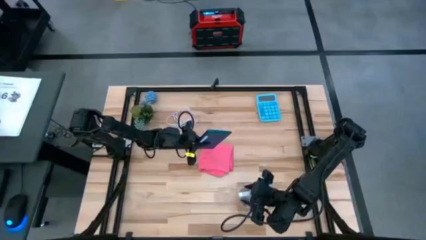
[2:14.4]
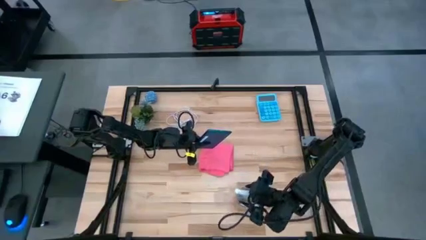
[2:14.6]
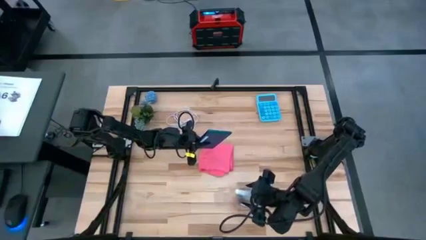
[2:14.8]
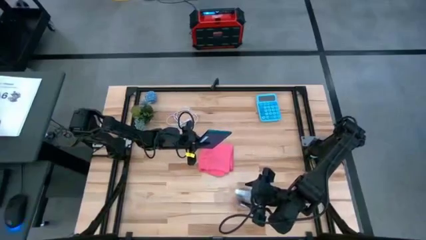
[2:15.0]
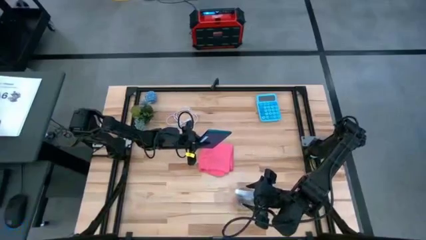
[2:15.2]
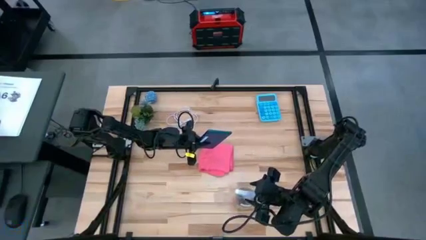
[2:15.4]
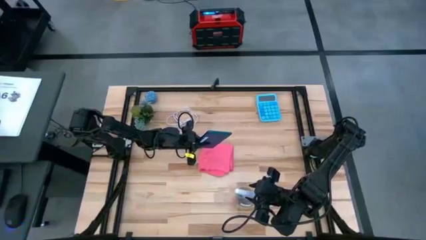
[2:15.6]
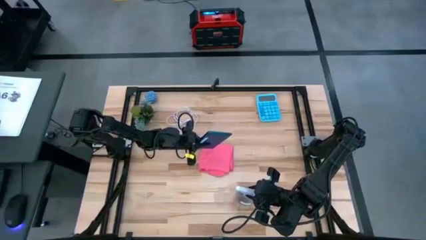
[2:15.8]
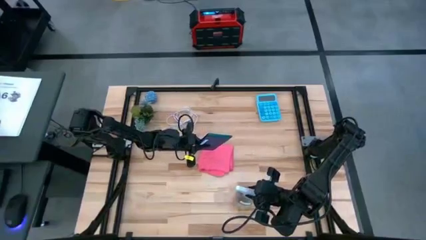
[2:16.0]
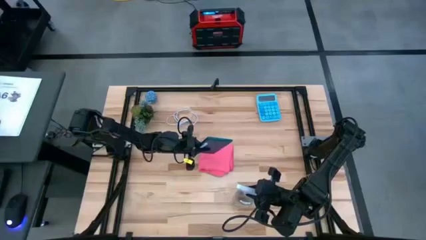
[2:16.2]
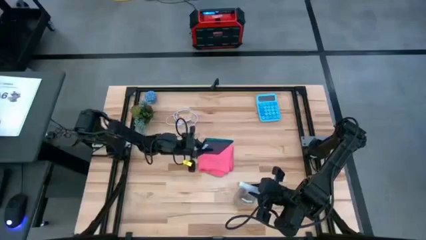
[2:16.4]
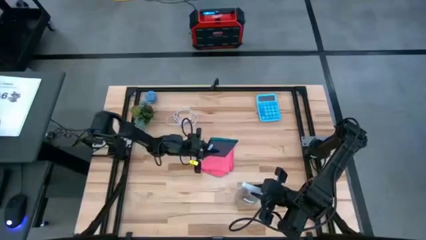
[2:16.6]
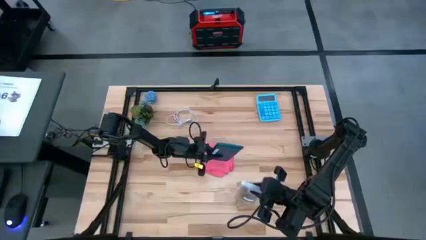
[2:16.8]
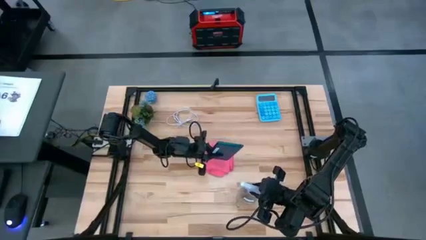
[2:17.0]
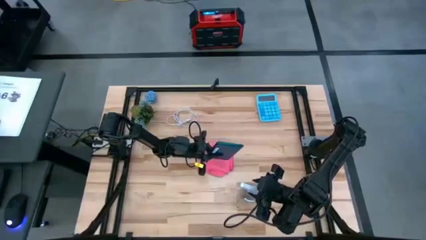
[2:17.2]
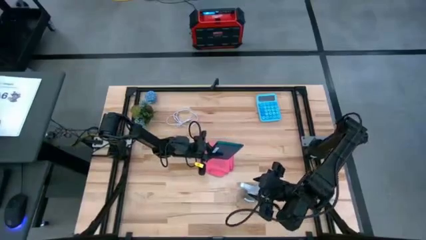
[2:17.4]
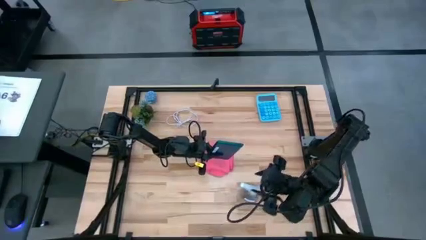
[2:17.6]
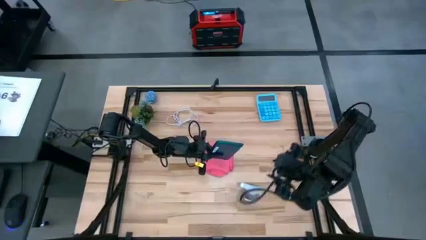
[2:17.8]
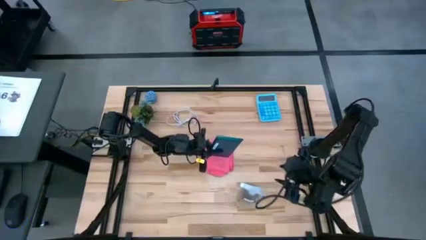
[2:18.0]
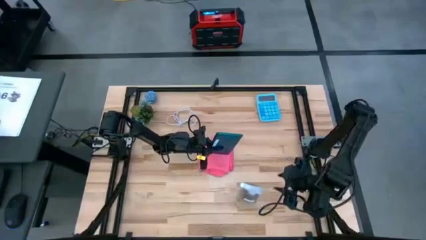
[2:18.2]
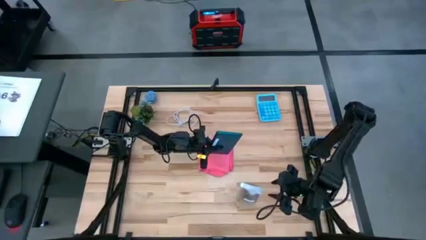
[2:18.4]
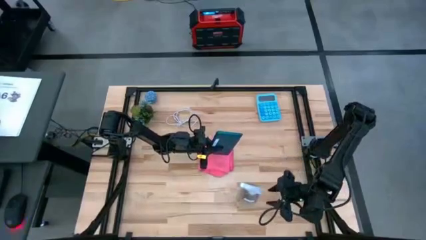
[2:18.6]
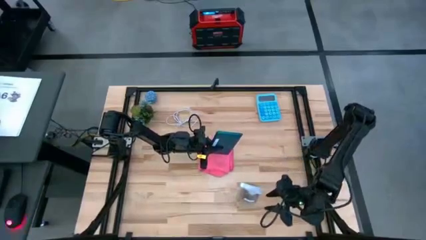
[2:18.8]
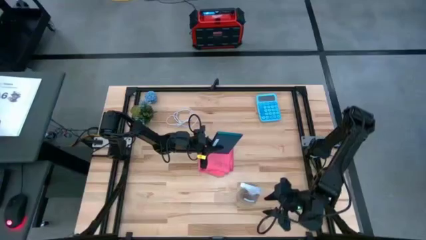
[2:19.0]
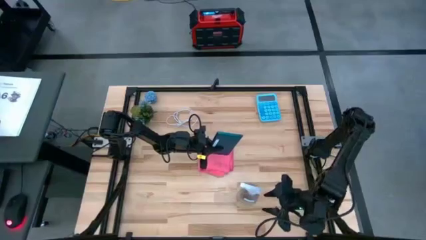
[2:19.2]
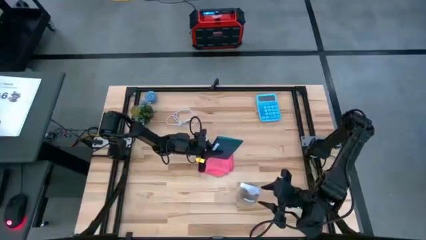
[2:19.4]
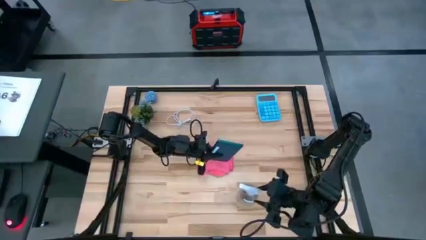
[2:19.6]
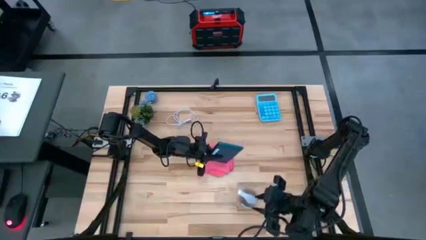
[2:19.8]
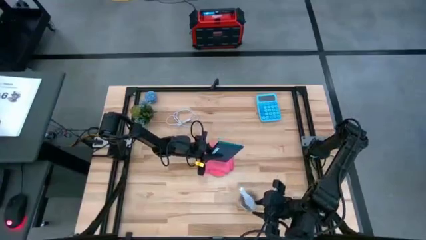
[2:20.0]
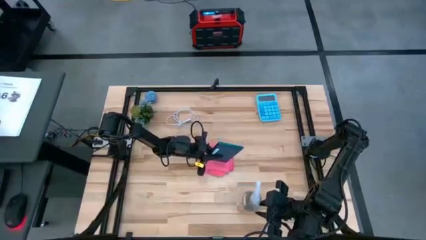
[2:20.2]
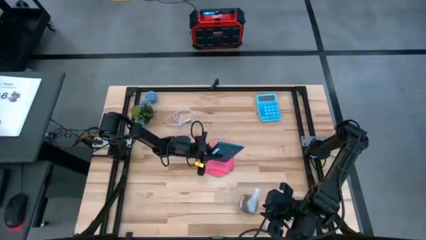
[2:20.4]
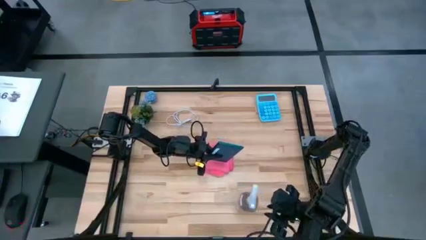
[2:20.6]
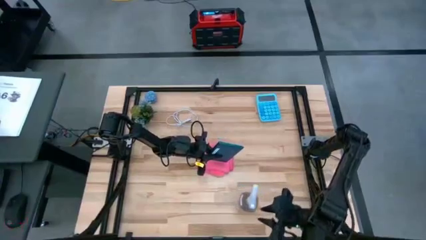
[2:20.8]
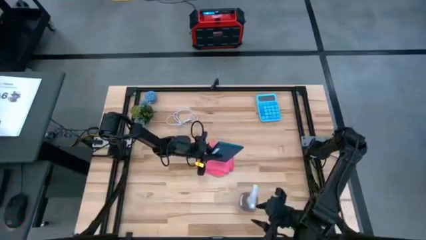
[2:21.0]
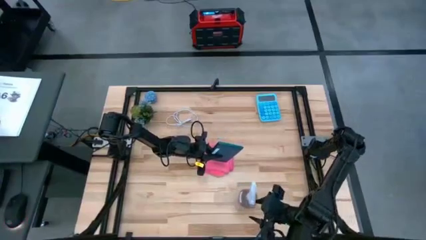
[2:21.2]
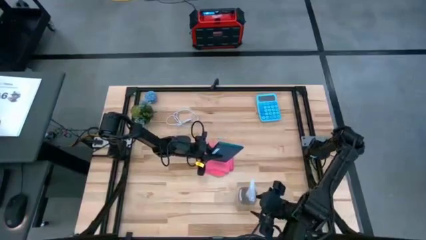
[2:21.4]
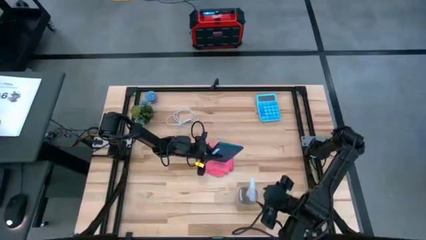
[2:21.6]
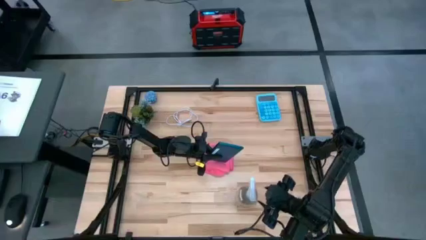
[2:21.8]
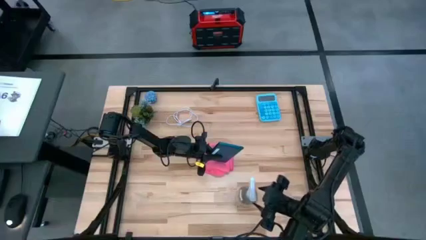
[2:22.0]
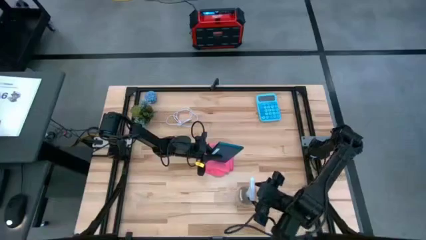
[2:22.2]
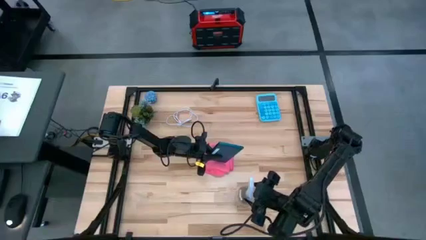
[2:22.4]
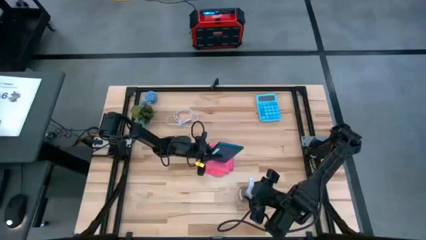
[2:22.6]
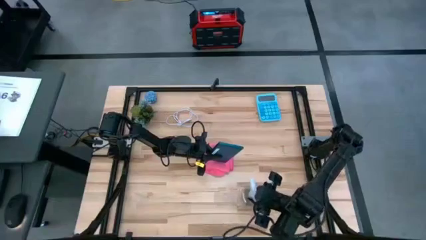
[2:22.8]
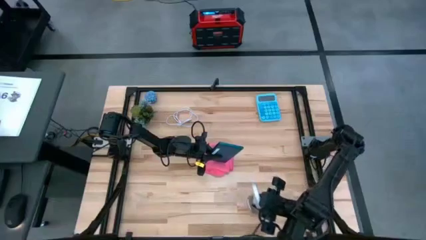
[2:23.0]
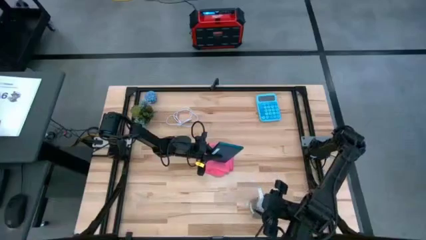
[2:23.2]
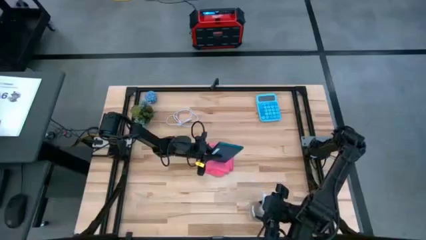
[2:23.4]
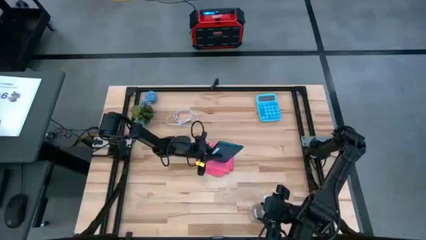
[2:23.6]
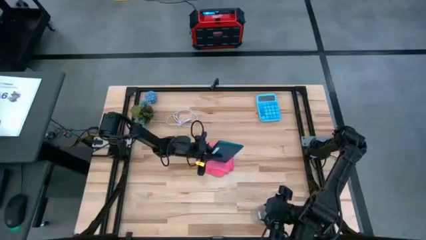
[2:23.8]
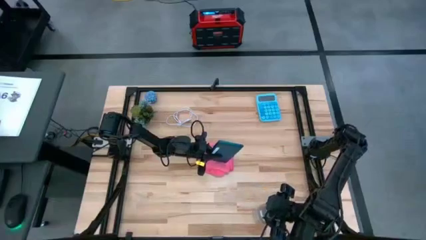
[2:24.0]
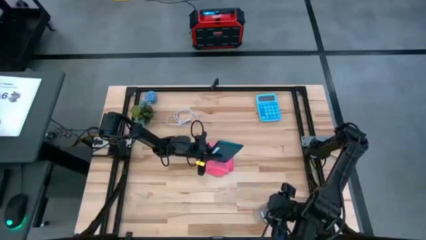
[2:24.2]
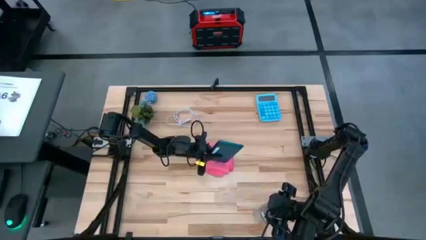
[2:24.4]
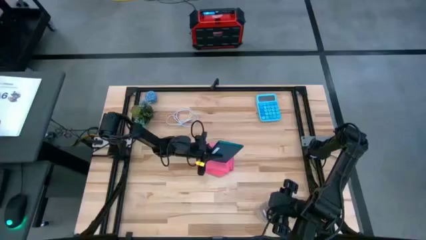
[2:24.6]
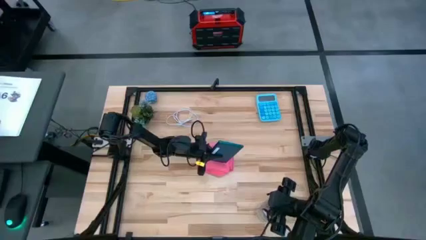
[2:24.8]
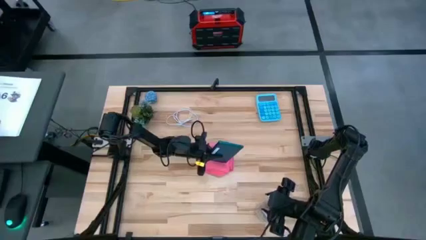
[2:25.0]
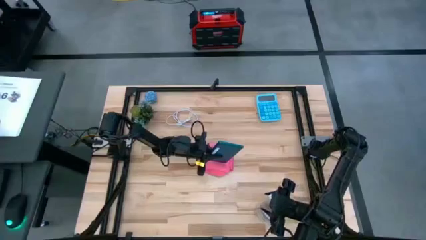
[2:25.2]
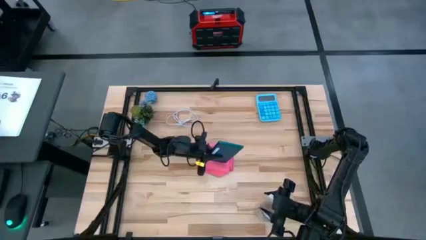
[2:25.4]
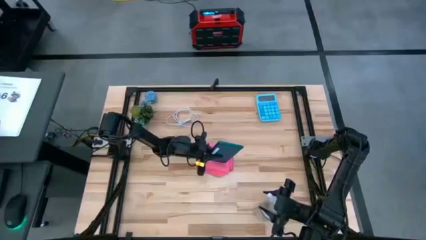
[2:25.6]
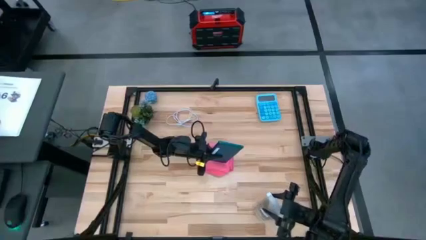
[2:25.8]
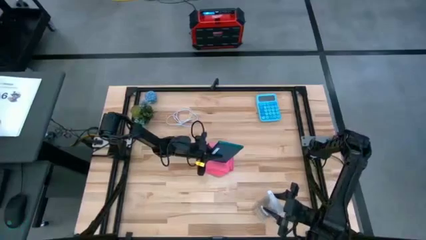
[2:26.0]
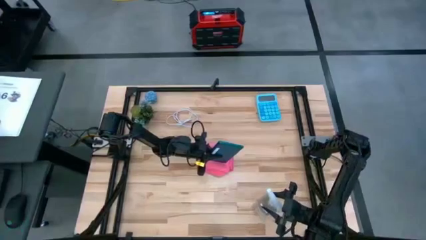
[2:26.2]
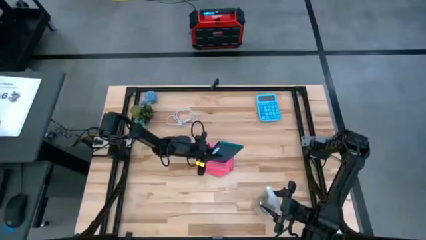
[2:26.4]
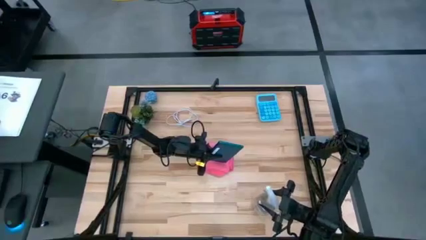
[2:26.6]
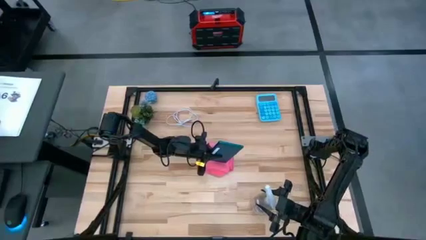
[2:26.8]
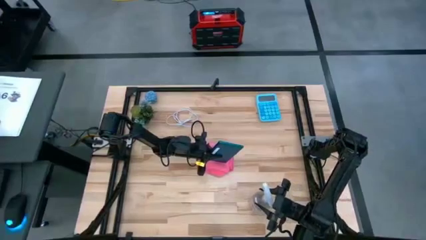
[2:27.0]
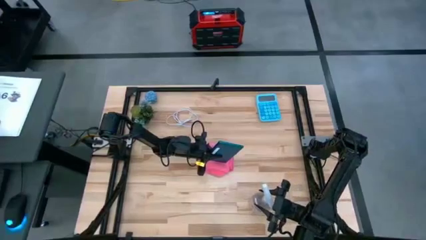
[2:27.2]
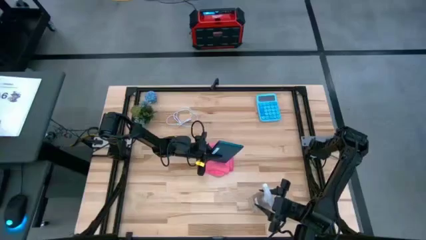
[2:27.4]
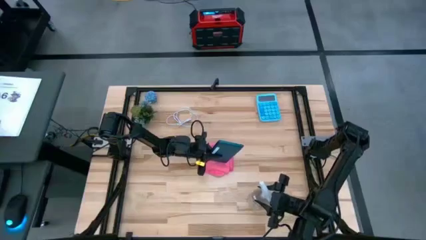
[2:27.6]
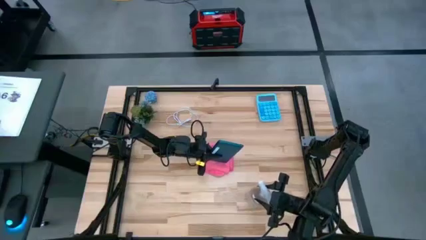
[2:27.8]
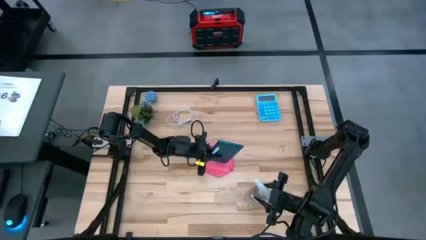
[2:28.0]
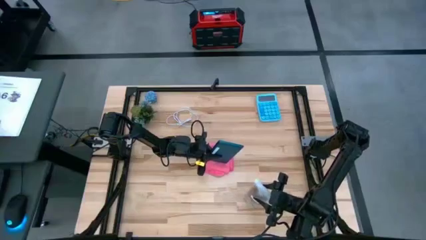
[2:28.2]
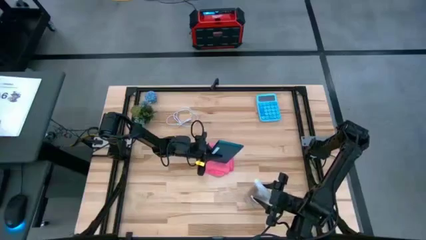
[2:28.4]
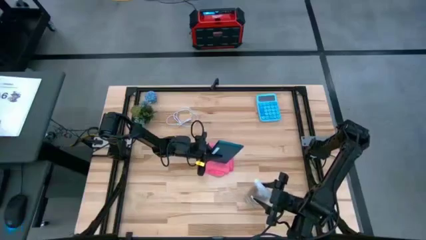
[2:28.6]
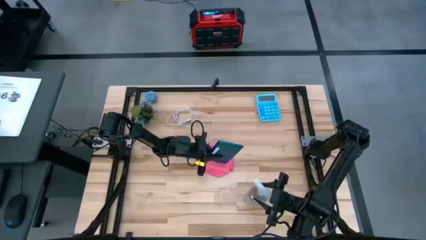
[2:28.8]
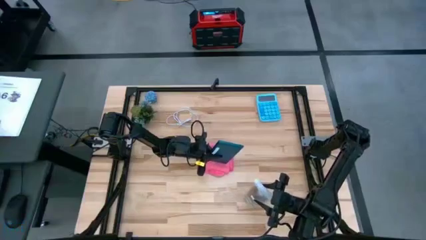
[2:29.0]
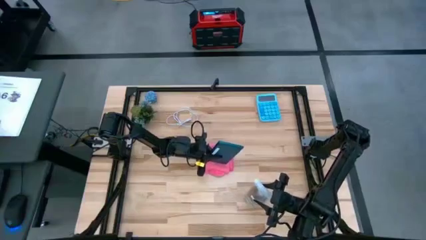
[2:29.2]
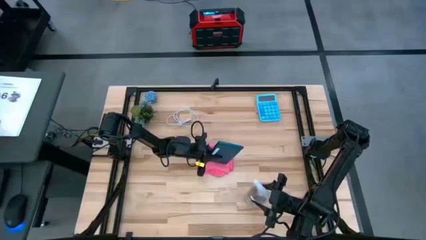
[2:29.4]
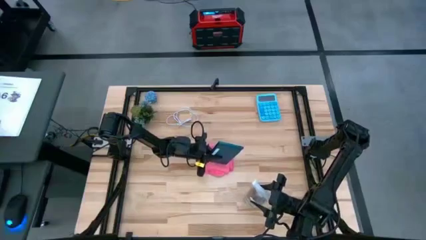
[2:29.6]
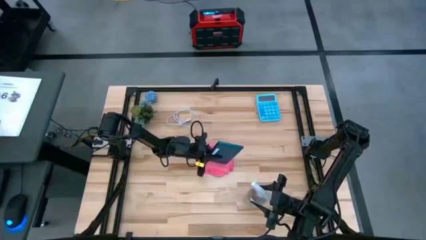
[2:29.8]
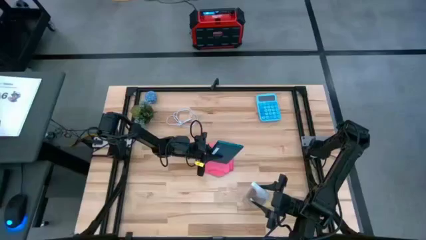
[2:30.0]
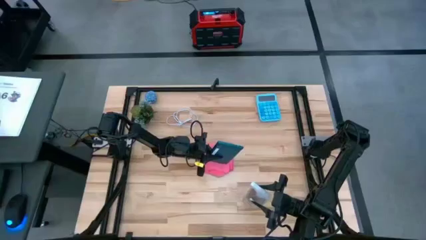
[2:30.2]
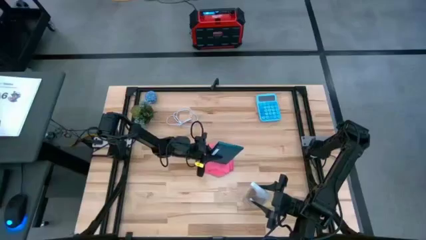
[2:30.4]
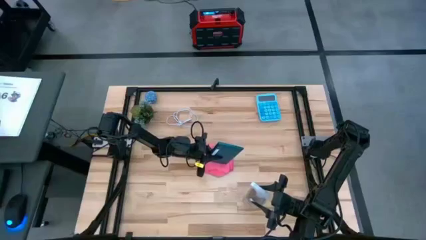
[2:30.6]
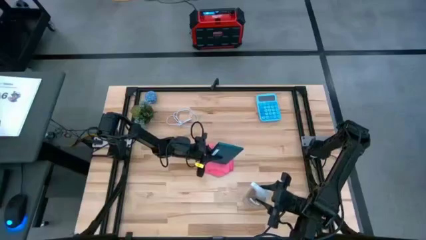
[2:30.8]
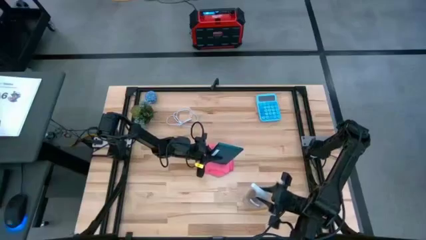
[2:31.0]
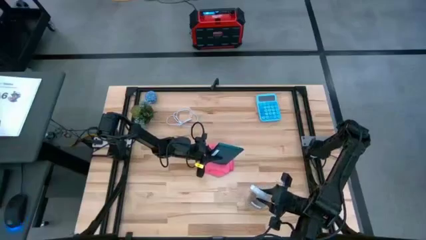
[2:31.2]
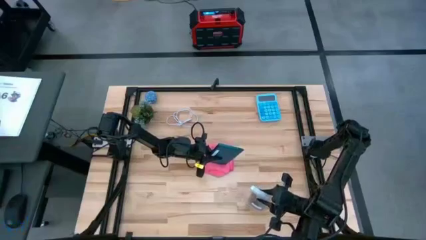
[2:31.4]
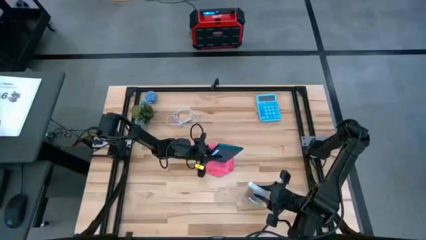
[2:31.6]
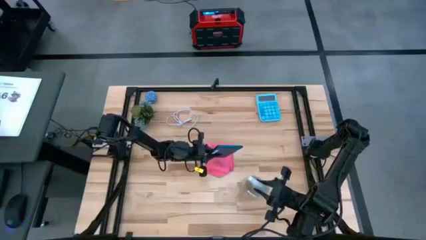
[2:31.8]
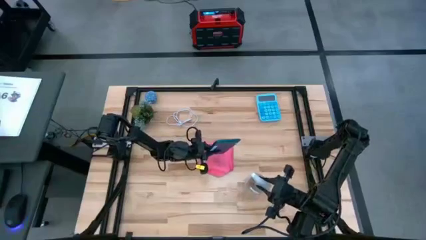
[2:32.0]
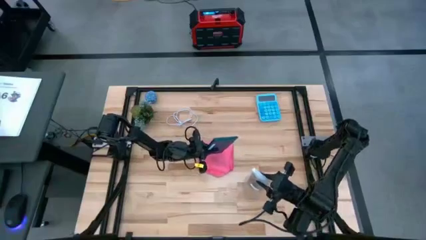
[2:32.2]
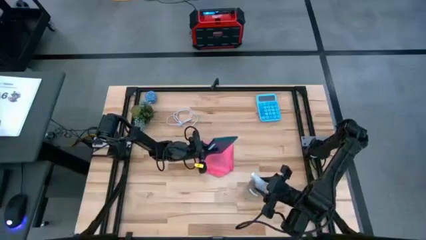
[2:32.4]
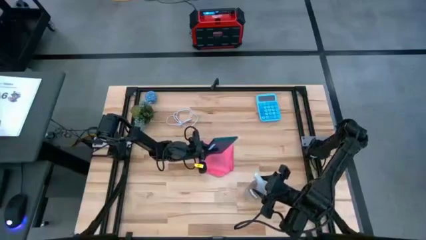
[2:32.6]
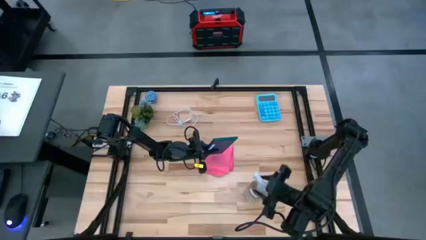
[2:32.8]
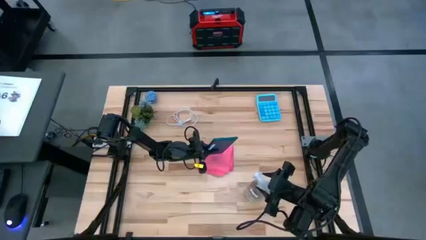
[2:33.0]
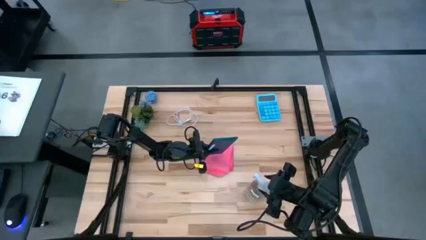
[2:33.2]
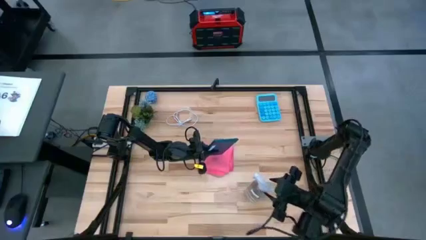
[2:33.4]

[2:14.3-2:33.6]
Task: Apply microfiber cloth
Spray the back of the cellphone using the spray bottle
